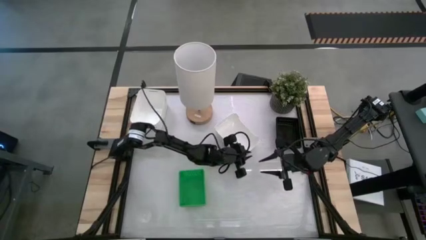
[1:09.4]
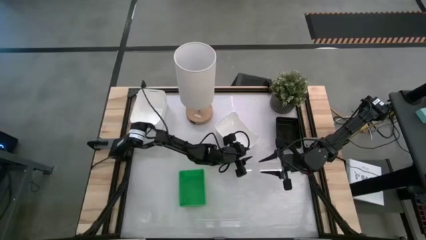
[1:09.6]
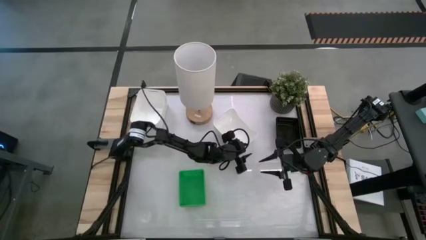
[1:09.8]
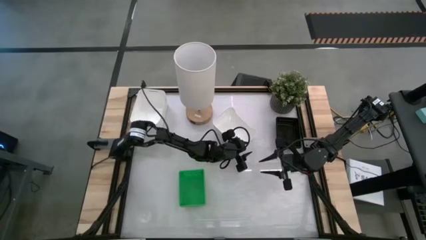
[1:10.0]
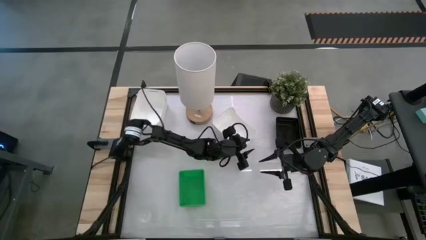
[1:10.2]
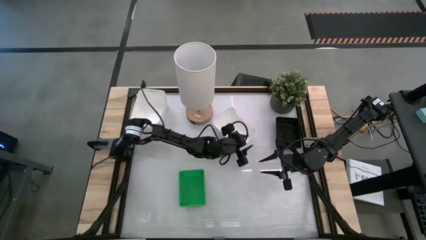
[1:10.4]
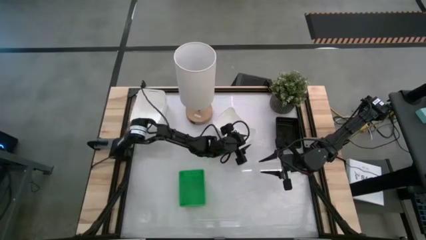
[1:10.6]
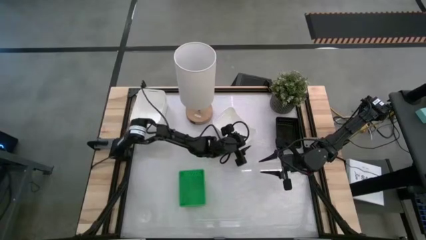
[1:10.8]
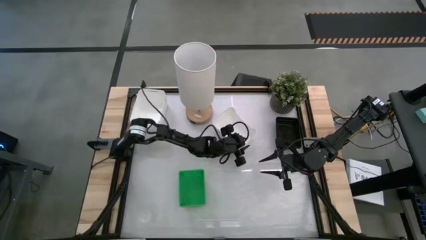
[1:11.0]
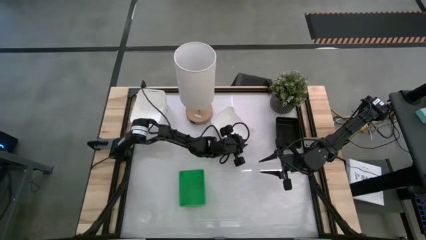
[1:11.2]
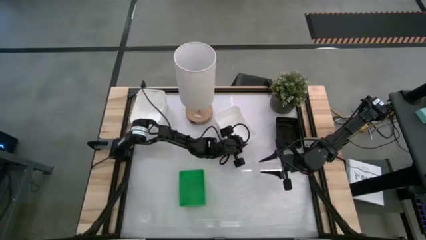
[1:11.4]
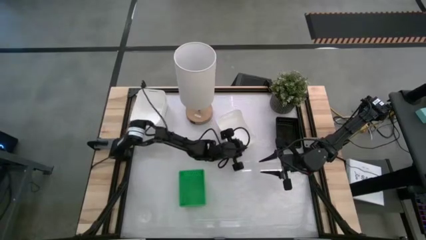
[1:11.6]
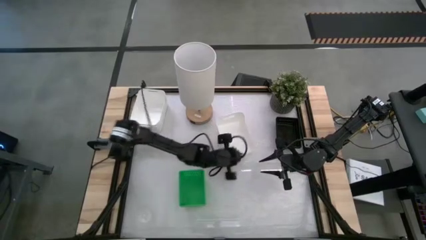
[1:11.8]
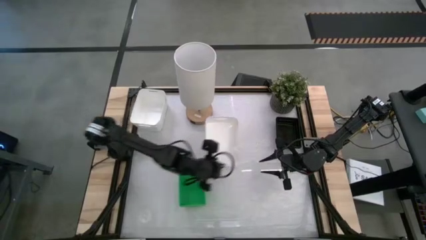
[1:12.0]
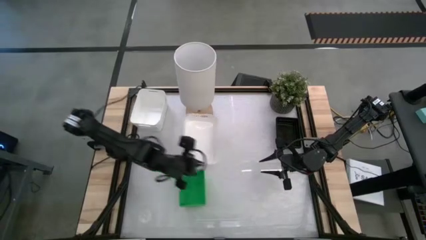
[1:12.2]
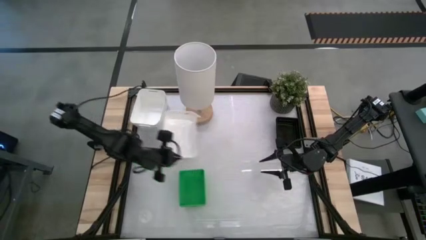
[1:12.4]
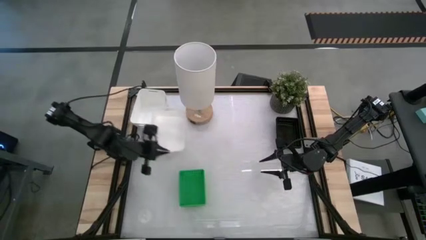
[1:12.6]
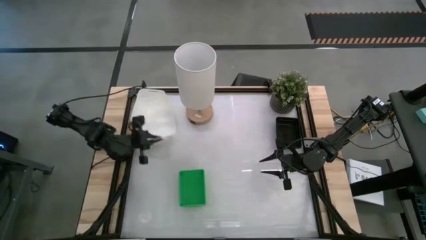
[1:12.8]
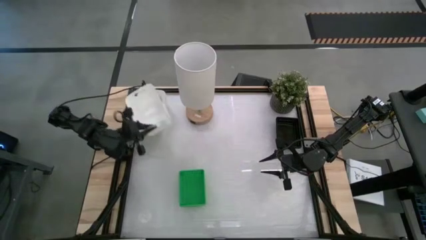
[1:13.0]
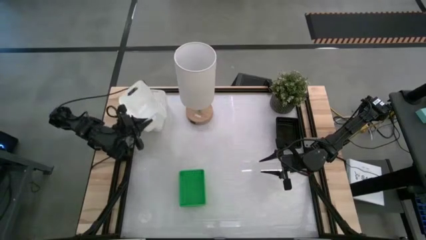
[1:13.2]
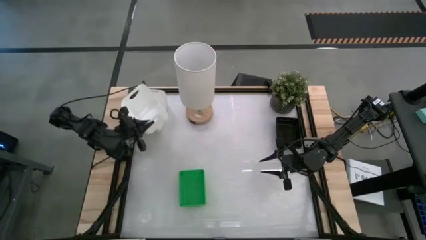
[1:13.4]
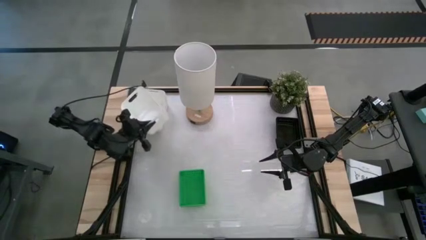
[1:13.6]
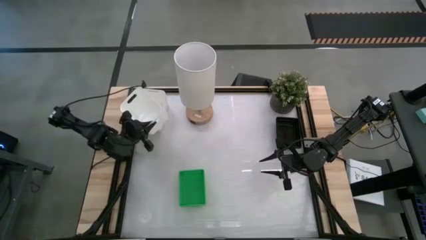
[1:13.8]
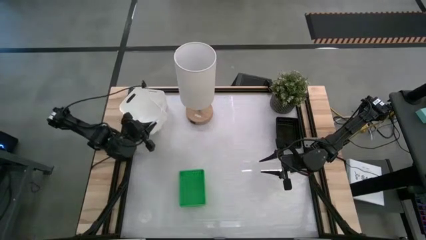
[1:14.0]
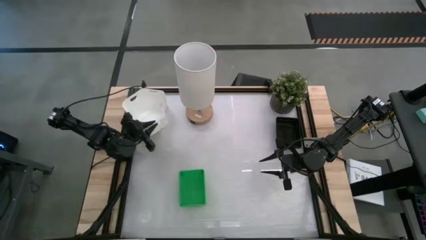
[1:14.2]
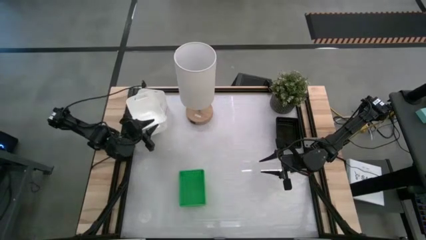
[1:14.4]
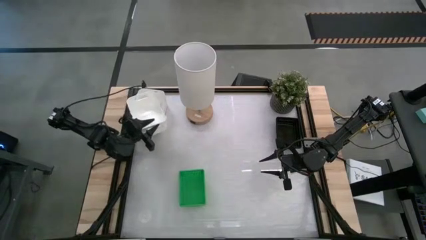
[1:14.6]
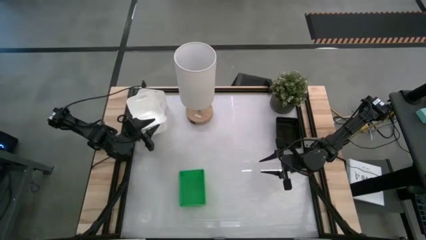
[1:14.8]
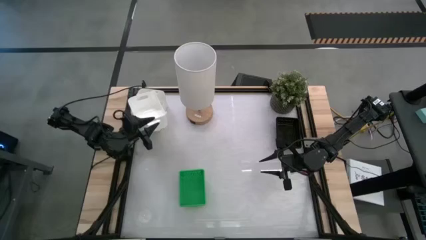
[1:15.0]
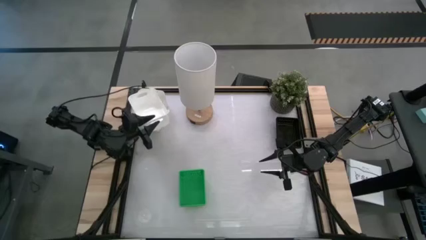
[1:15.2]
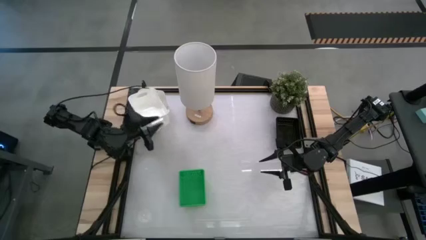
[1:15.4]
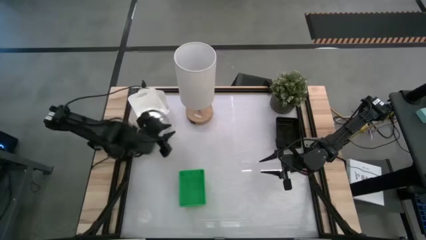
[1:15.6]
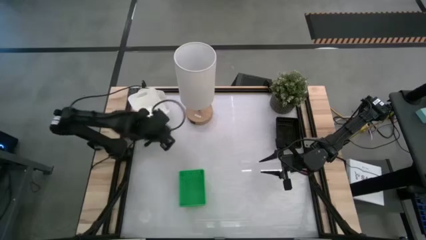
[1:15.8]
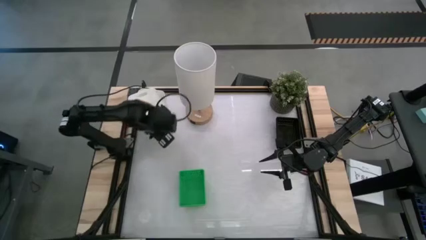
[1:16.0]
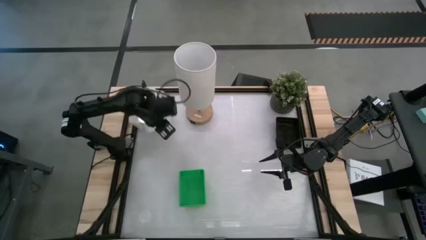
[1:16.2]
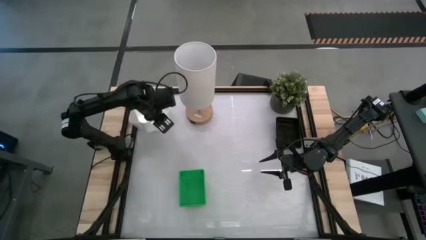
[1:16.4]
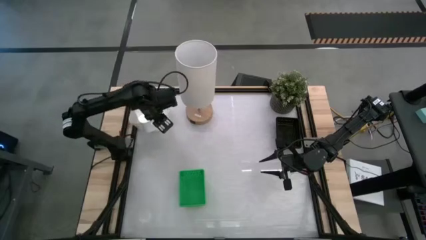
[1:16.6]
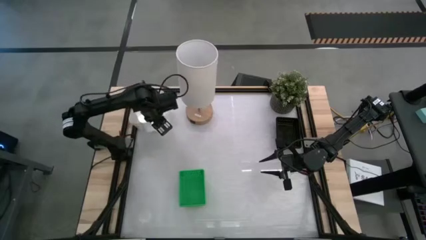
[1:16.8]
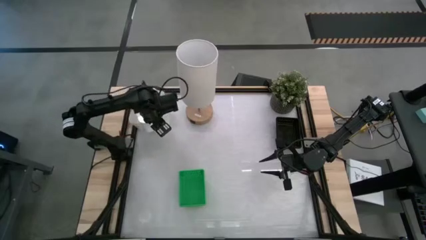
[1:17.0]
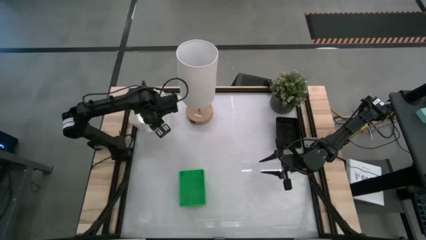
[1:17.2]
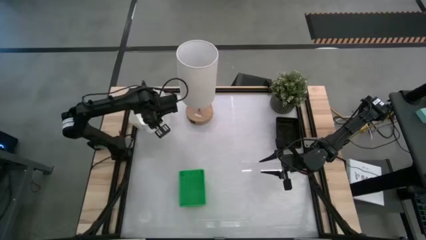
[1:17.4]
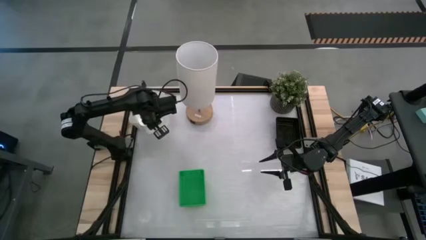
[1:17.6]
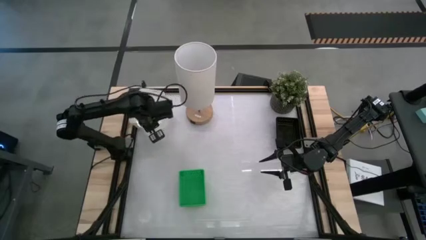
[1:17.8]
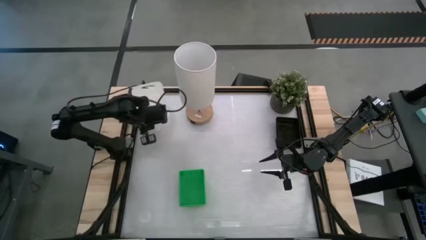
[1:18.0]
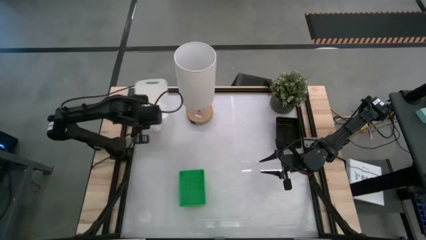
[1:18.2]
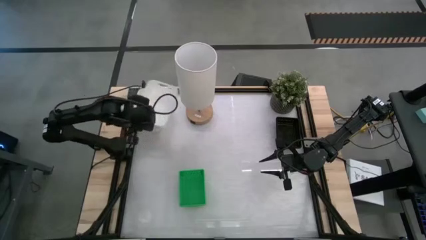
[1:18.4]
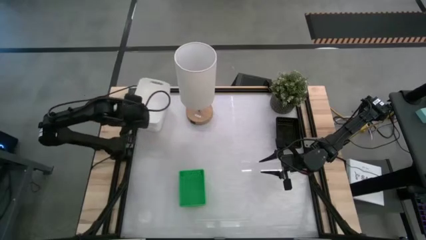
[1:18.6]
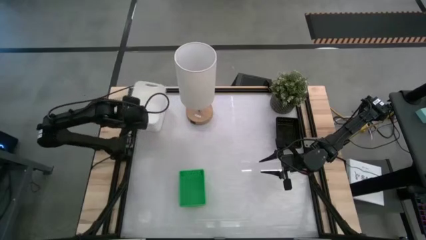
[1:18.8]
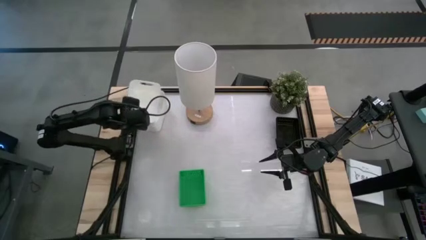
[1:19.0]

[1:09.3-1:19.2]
Stack the white bin on the white bins

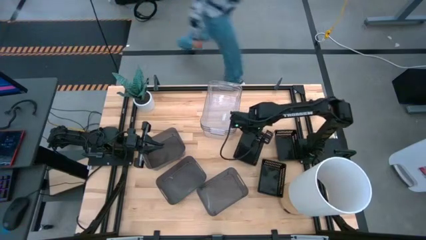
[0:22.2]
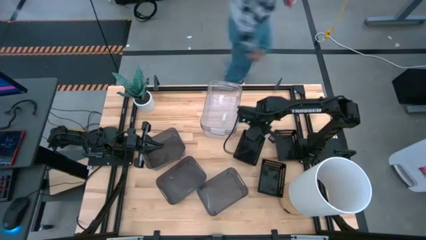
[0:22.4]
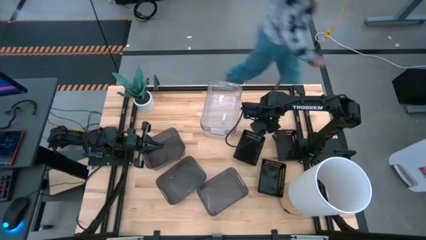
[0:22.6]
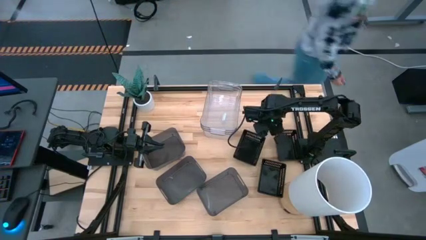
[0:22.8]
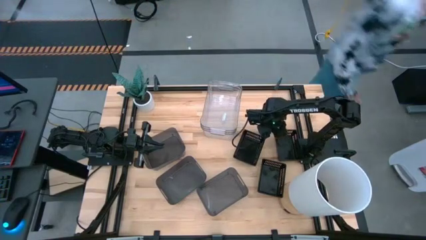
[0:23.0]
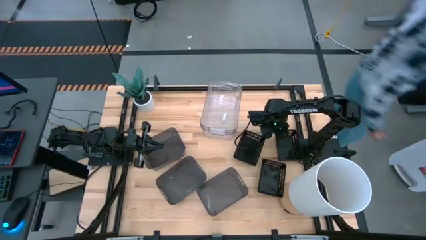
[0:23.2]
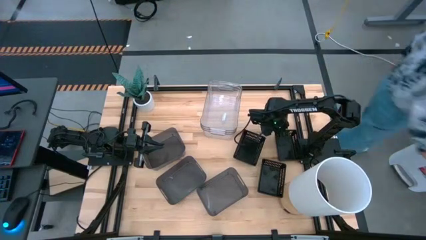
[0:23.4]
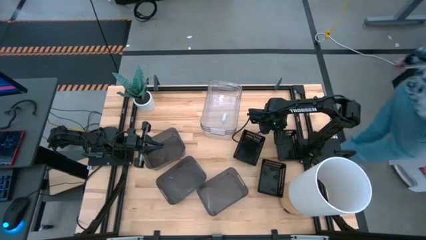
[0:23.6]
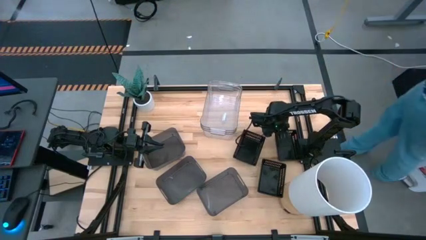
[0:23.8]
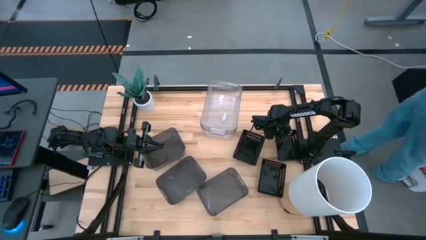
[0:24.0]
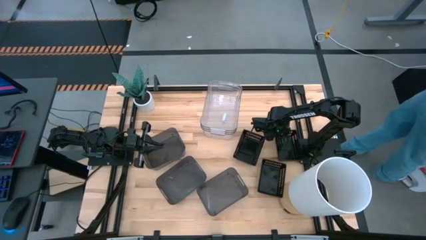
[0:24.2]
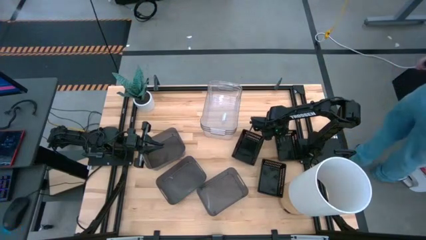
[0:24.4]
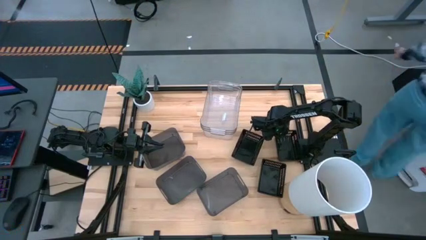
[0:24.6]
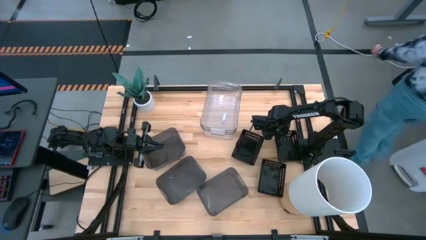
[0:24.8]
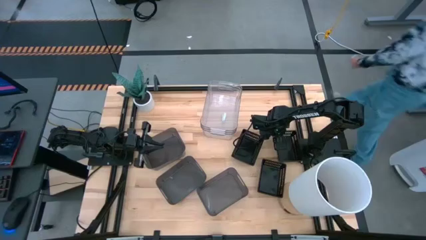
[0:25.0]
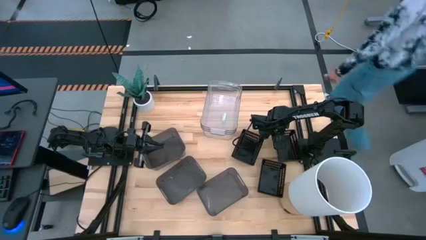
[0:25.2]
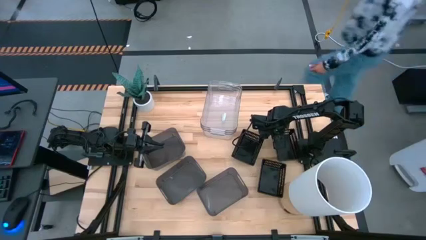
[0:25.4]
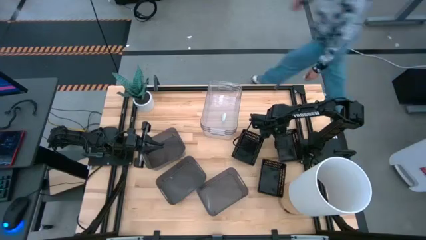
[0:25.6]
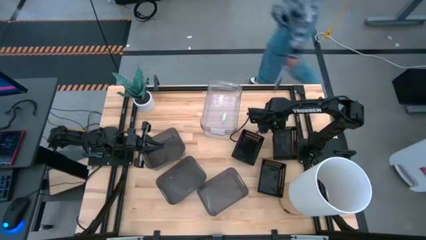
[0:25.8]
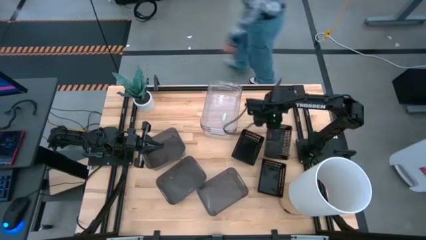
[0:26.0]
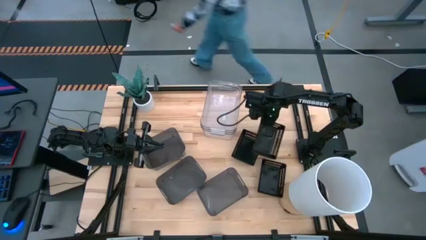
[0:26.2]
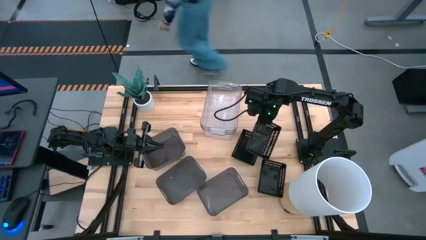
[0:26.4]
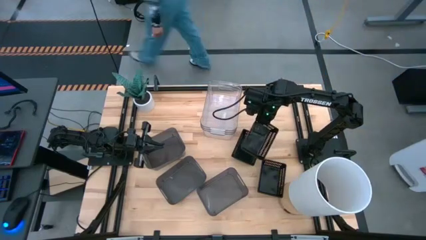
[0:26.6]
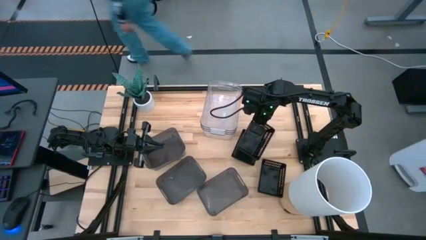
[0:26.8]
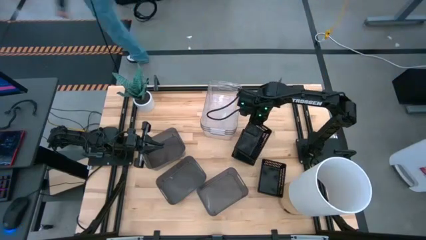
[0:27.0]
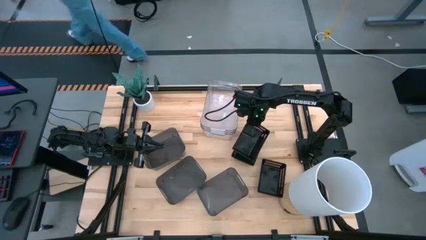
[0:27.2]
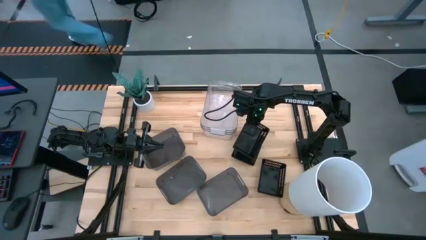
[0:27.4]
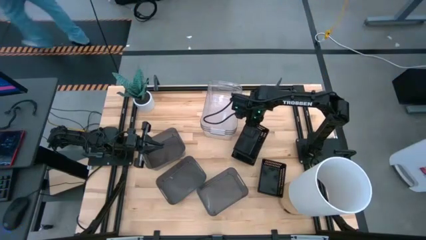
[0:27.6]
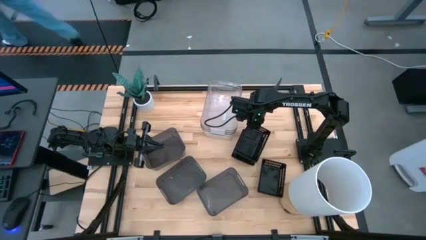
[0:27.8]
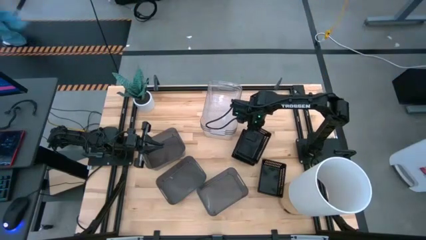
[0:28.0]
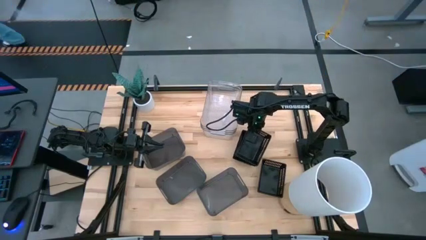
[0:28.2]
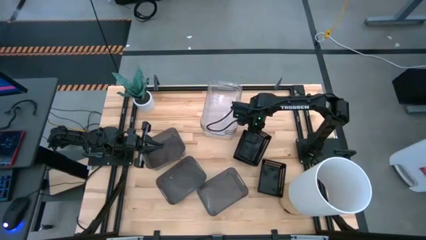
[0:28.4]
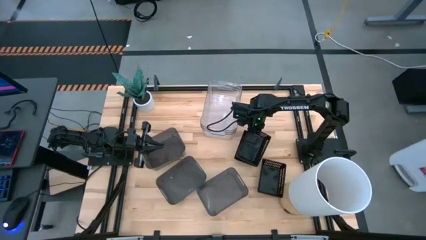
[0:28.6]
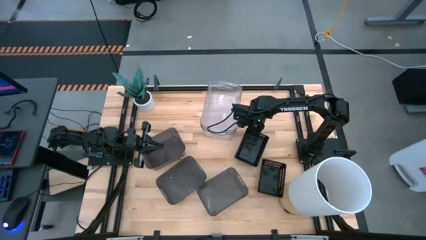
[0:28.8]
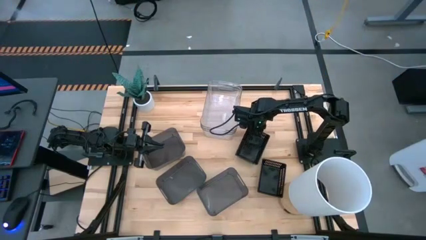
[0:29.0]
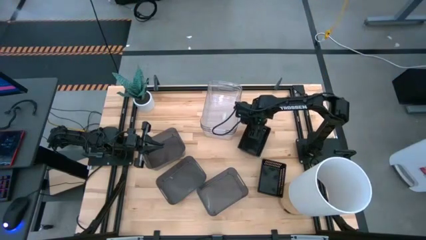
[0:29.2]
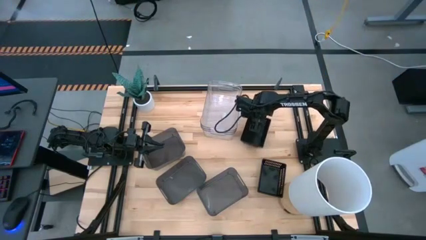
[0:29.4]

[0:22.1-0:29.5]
Stack the right black bin on the left black bin
